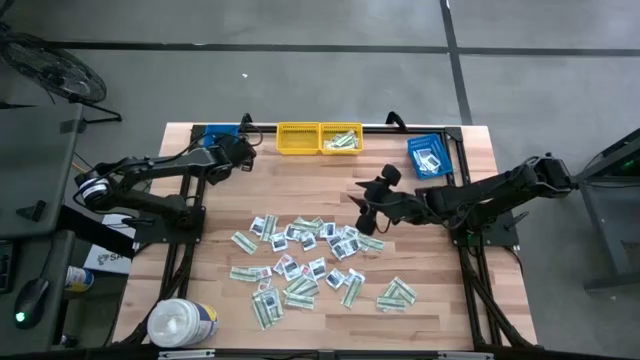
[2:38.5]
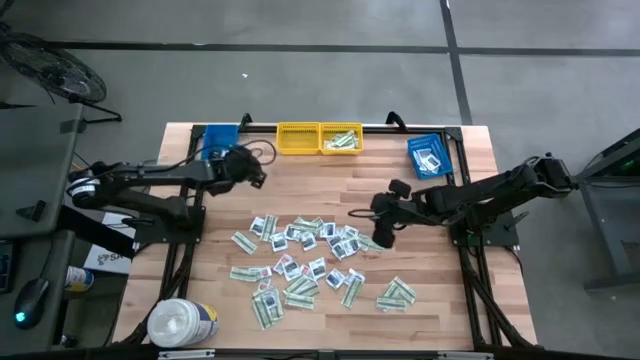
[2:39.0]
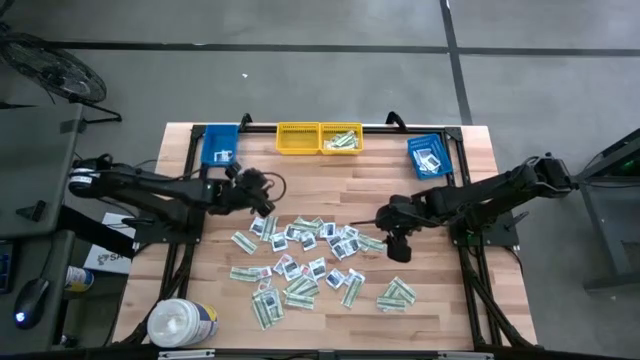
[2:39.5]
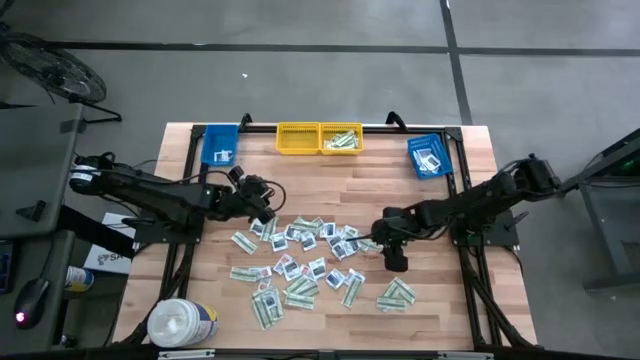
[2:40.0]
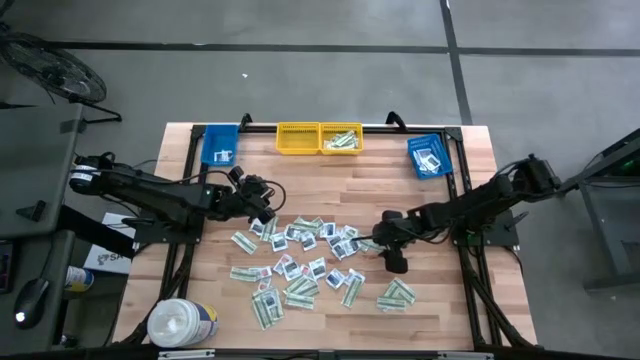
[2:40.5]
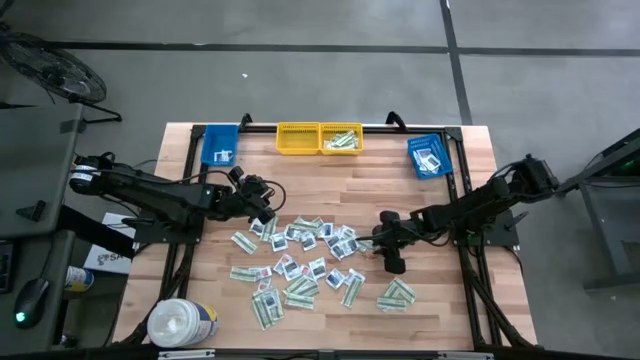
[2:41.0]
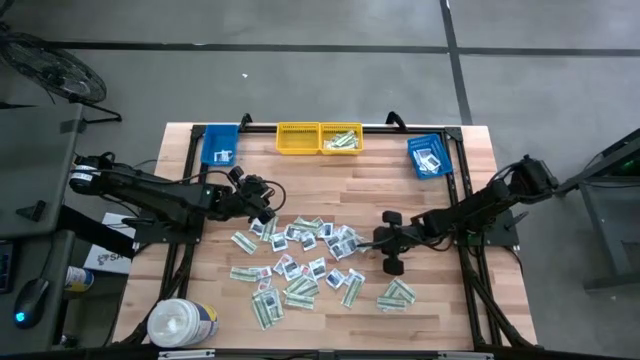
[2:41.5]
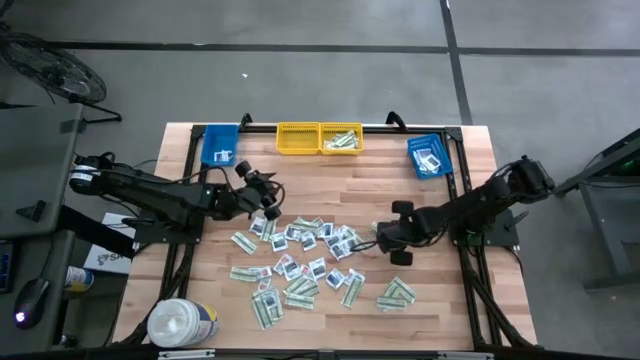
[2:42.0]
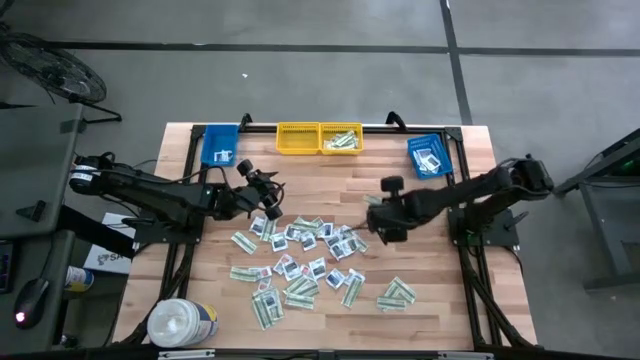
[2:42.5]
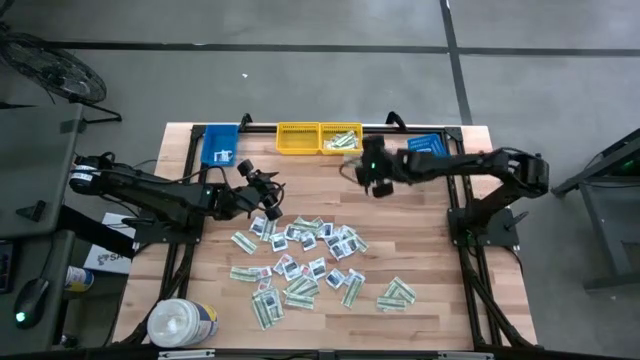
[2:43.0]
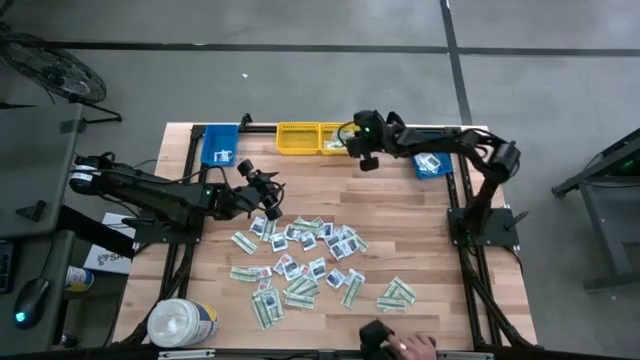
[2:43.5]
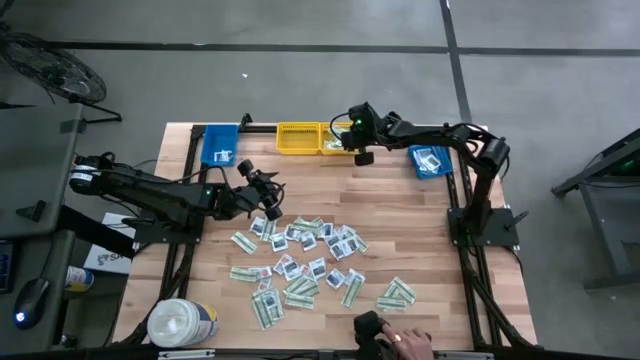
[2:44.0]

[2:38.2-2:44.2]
Task: Pick & Place First Aid Supplies
Put the green bandage pack into the right yellow bin

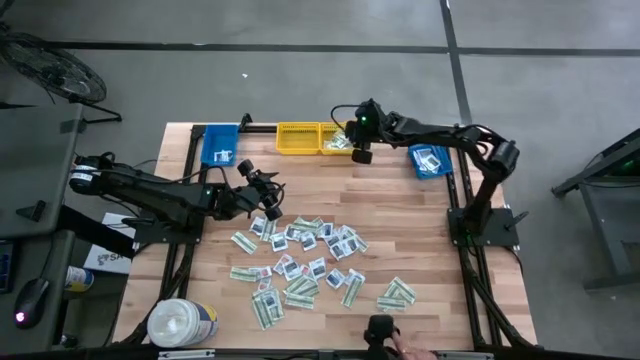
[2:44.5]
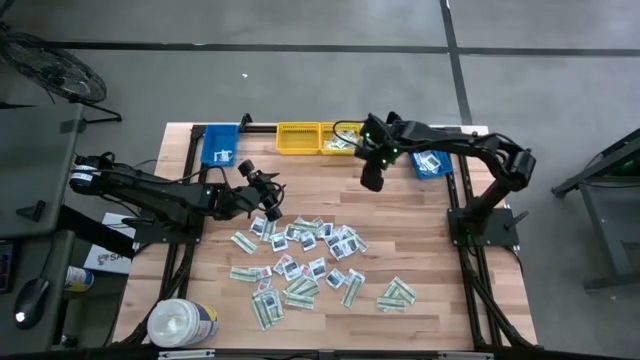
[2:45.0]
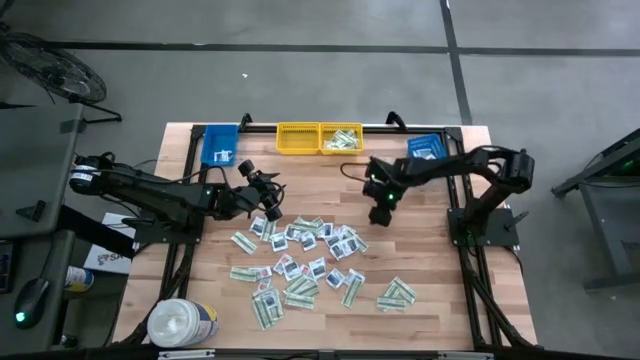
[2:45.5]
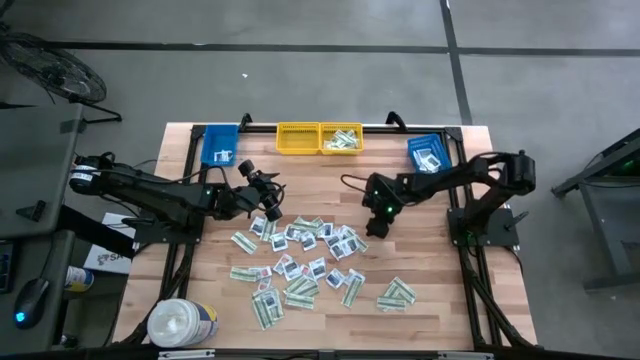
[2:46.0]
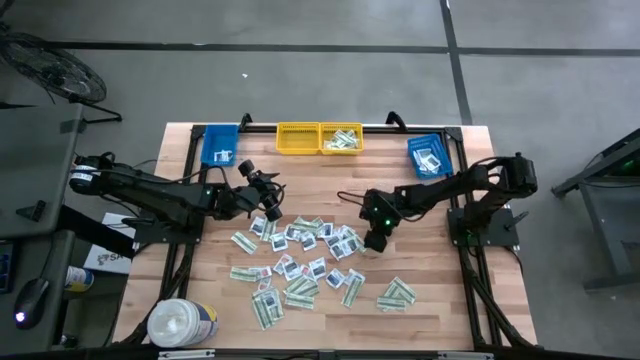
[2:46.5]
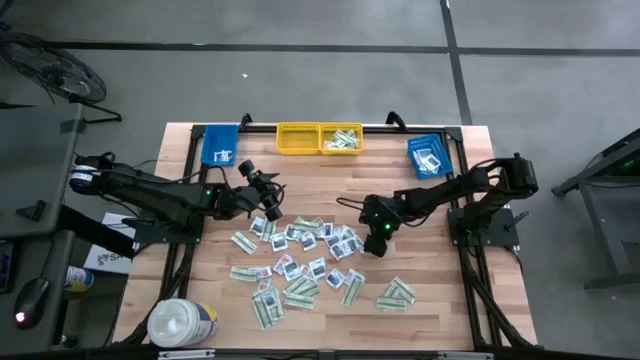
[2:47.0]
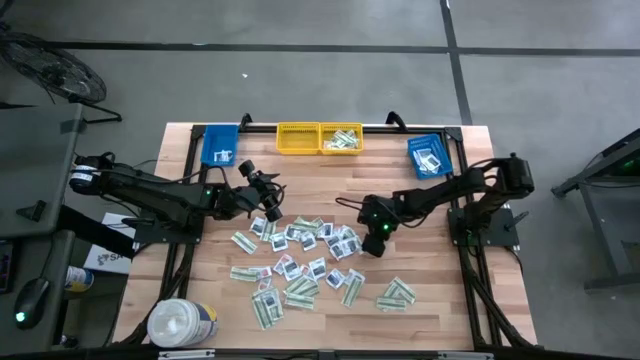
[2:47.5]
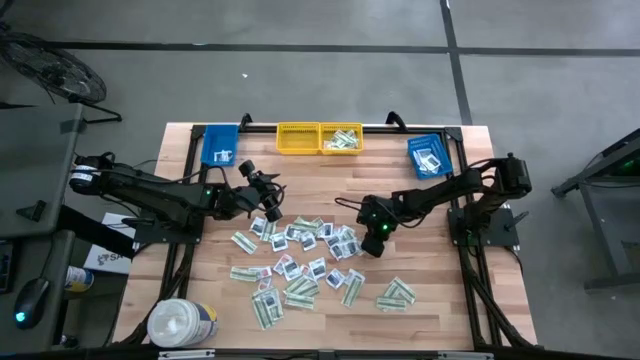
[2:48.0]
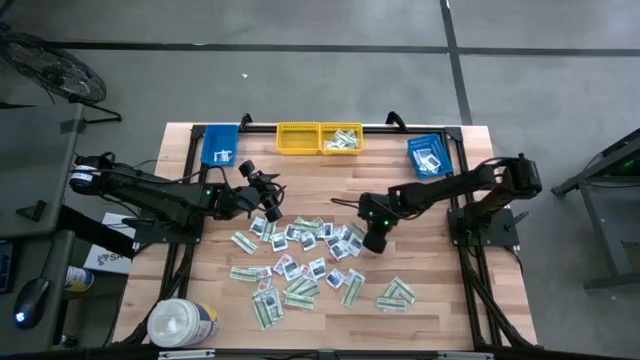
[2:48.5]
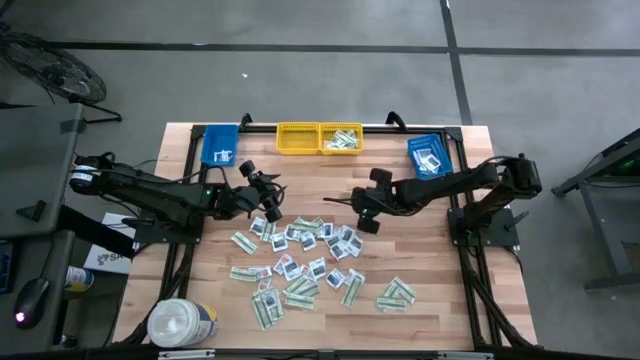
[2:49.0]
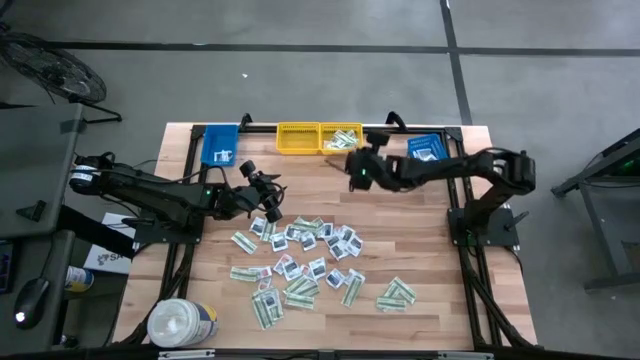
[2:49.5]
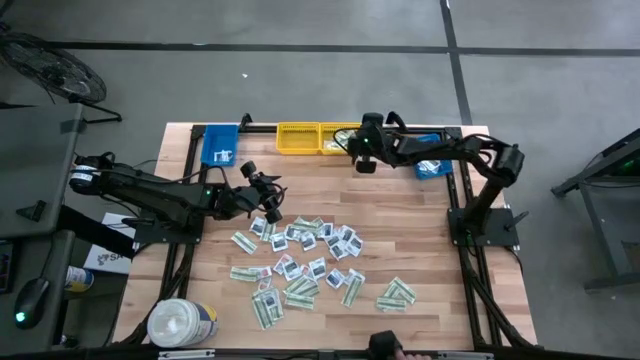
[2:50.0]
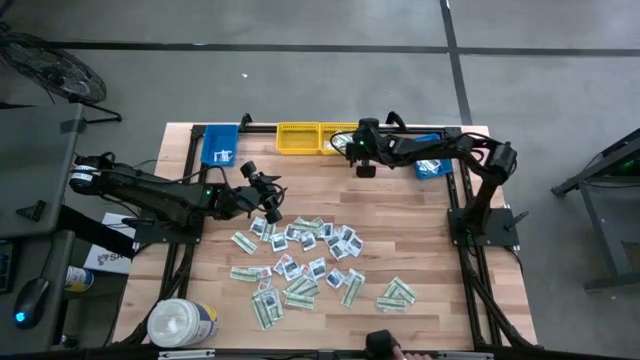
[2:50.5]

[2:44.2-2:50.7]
Put the green bandage pack into the right yellow bin

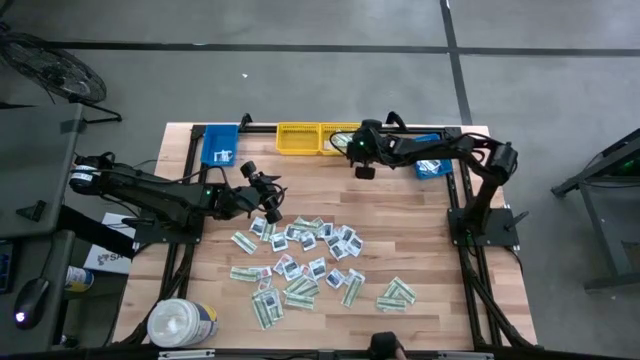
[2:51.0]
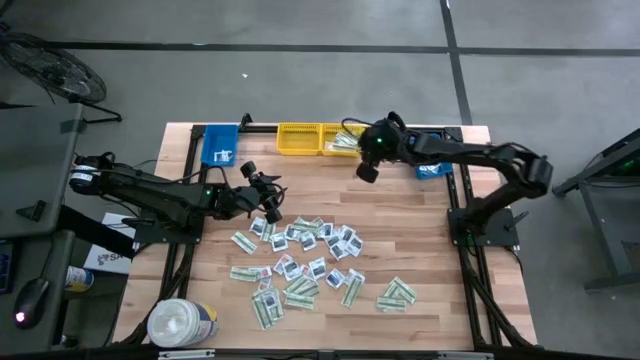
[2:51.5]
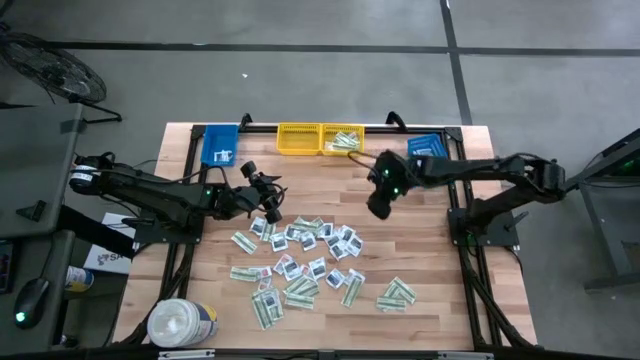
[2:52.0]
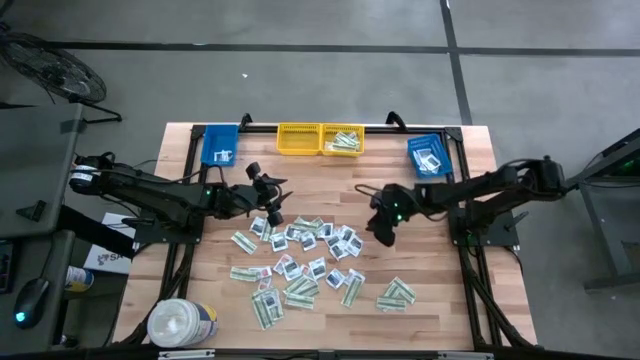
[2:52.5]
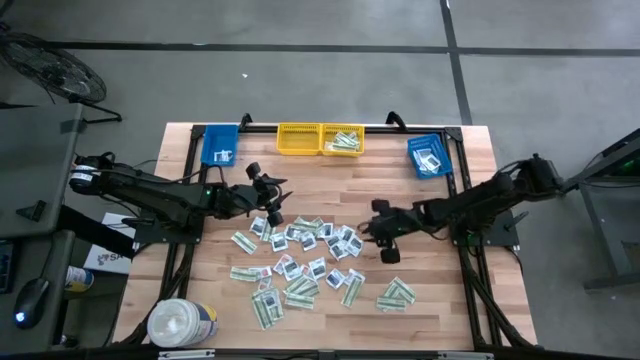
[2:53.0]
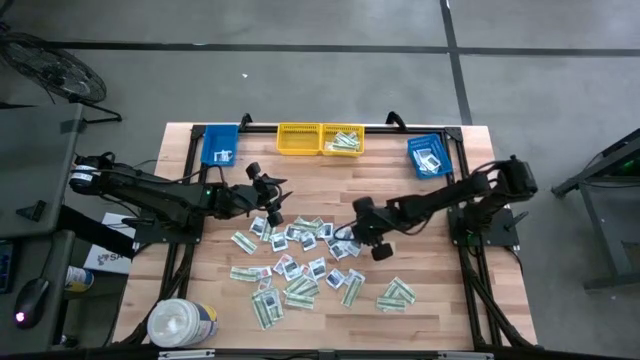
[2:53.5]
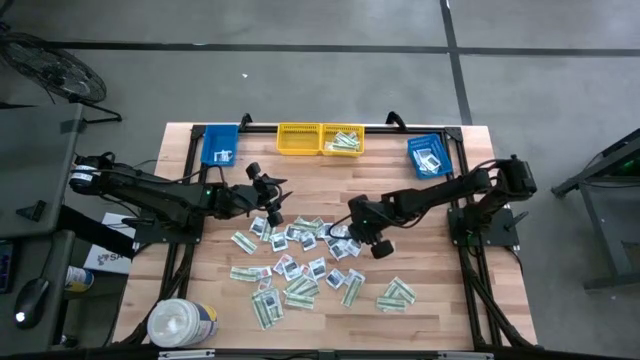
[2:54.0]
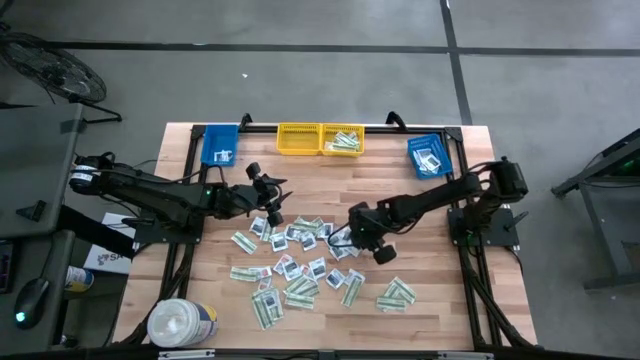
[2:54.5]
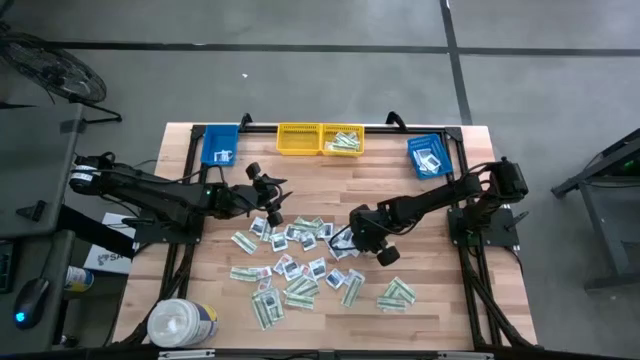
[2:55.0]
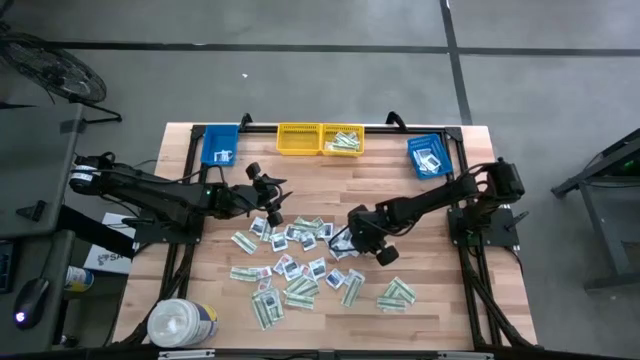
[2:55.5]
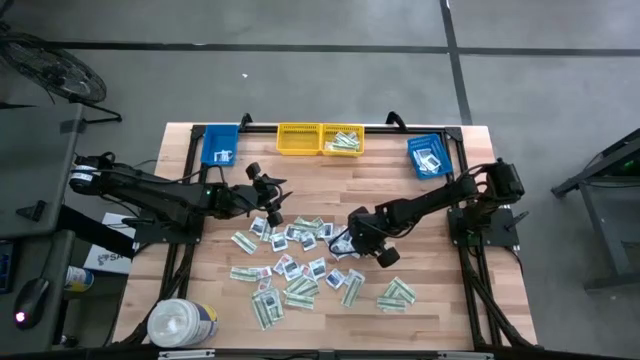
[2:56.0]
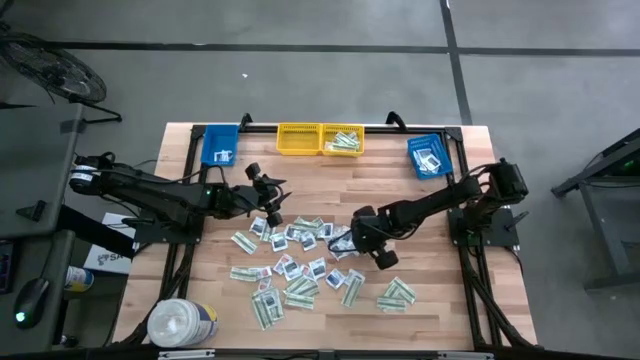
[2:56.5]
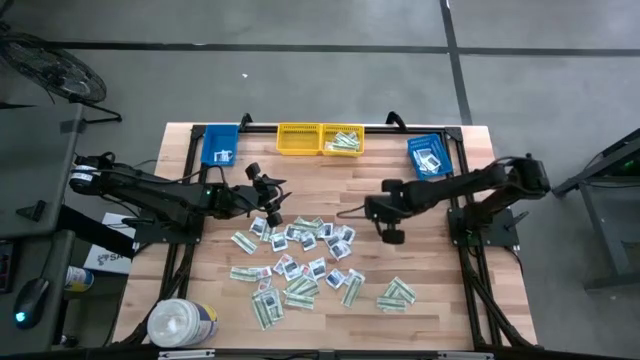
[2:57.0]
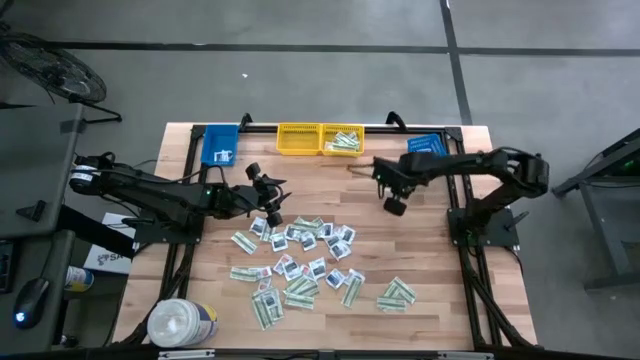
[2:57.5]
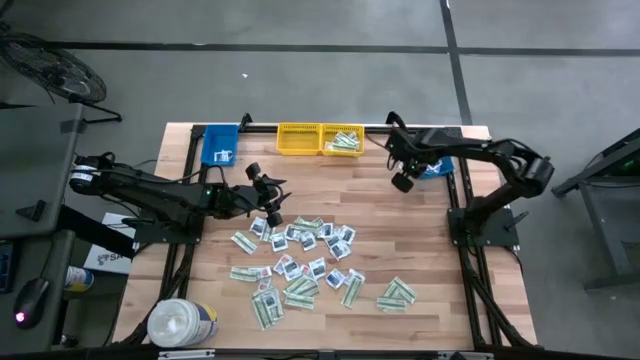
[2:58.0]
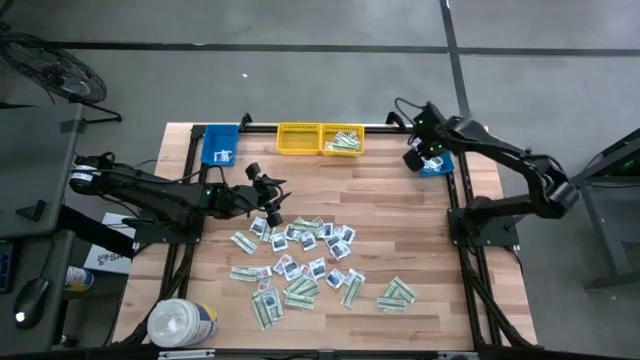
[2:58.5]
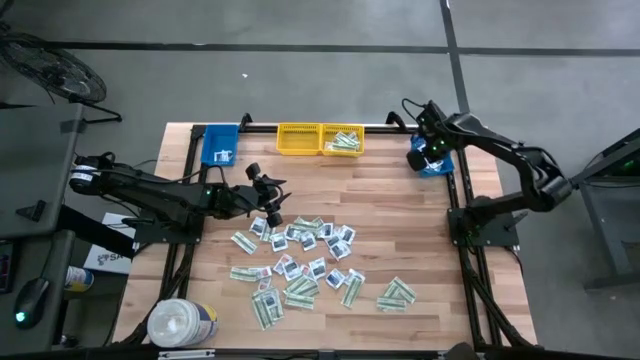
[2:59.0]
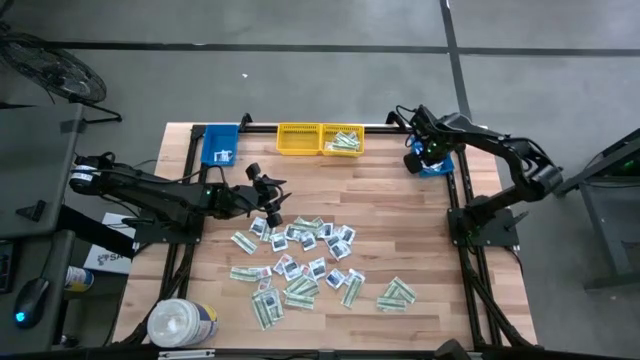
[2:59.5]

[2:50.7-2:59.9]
Put the black towelette pack into the right blue bin
